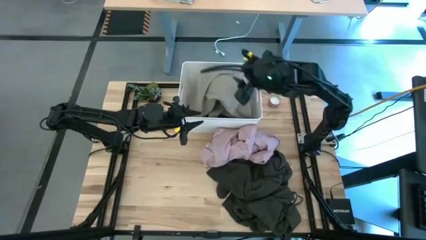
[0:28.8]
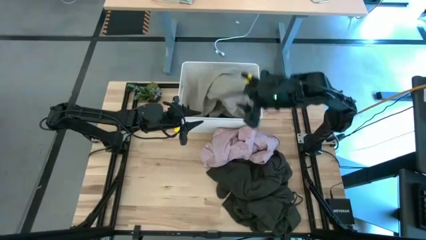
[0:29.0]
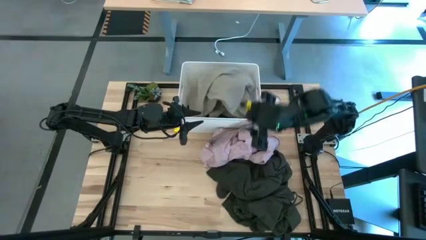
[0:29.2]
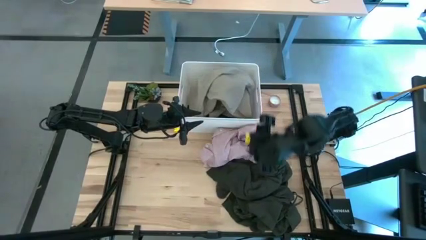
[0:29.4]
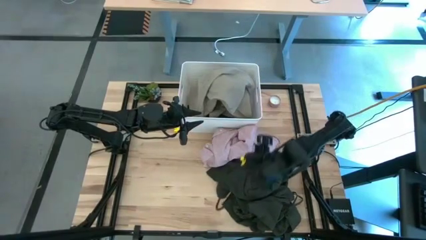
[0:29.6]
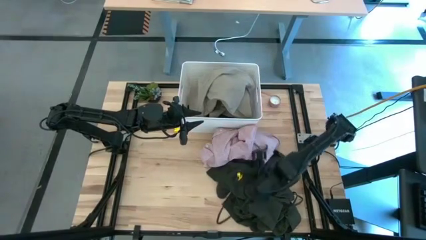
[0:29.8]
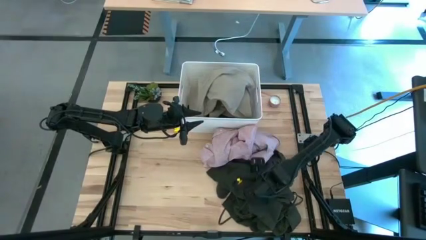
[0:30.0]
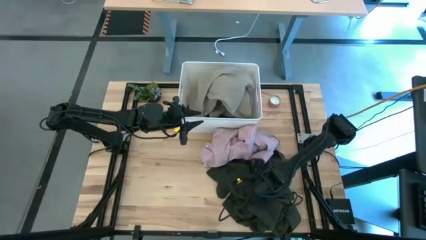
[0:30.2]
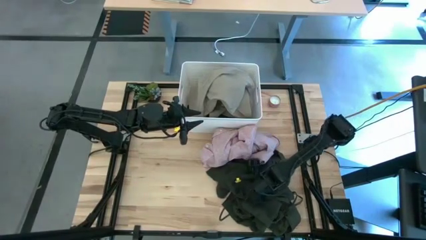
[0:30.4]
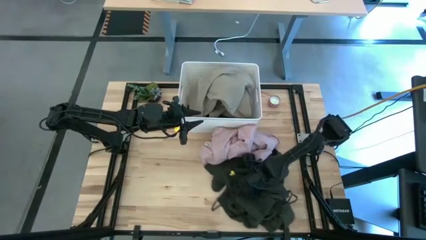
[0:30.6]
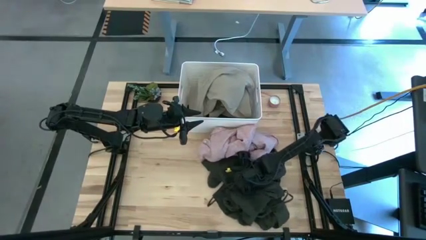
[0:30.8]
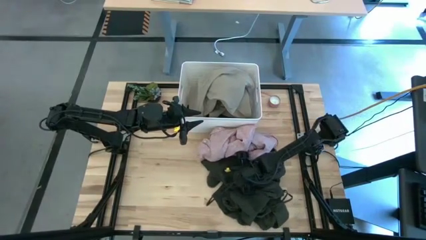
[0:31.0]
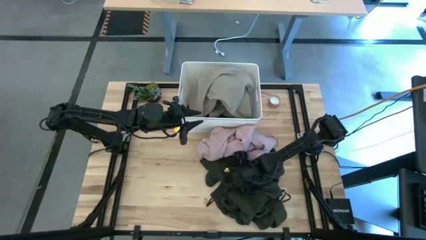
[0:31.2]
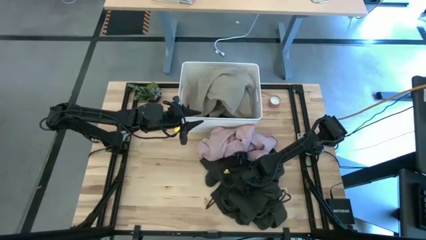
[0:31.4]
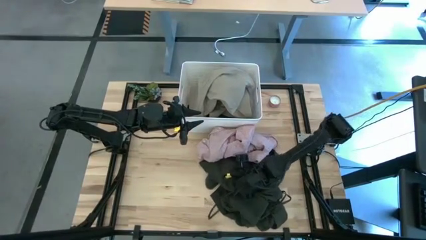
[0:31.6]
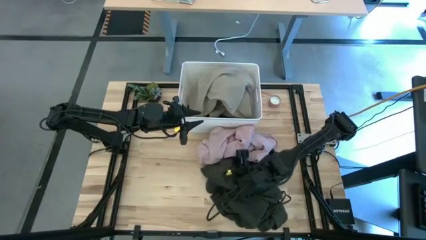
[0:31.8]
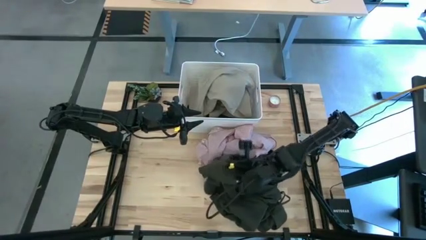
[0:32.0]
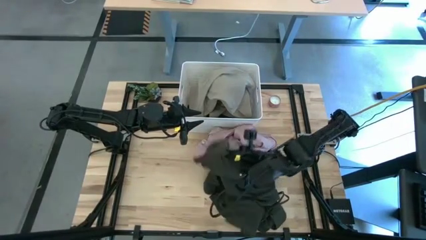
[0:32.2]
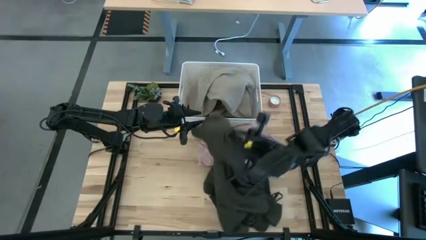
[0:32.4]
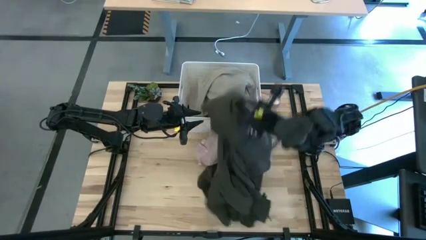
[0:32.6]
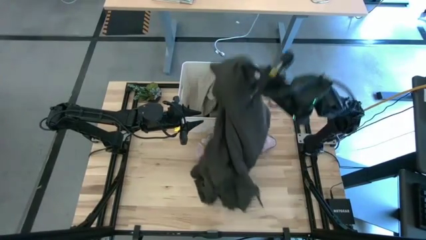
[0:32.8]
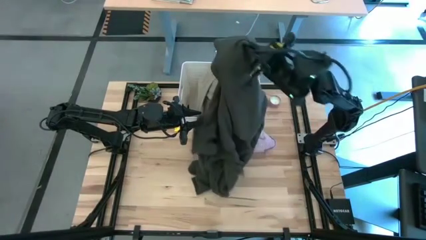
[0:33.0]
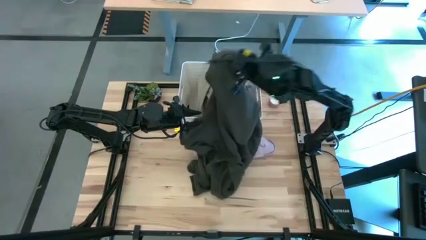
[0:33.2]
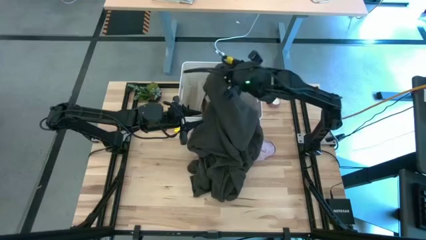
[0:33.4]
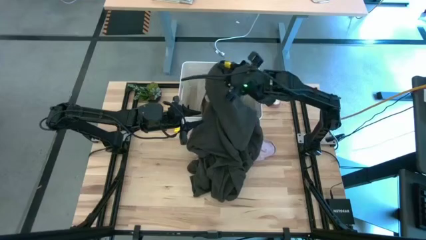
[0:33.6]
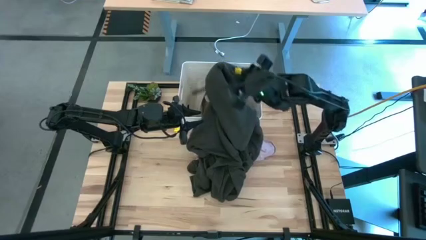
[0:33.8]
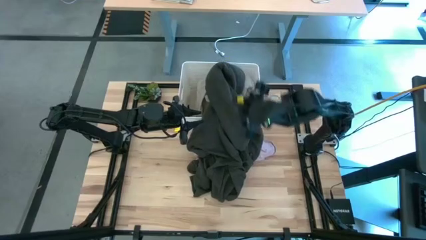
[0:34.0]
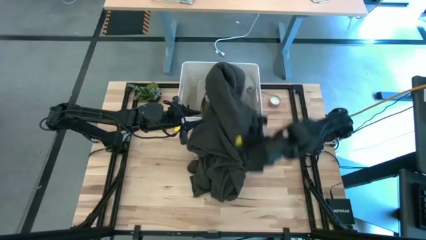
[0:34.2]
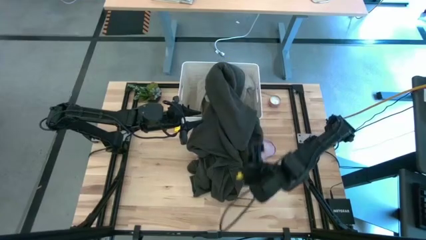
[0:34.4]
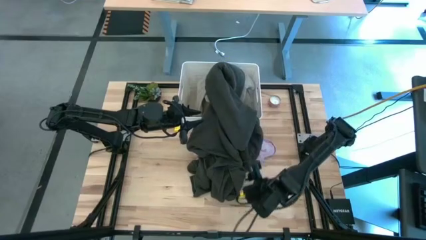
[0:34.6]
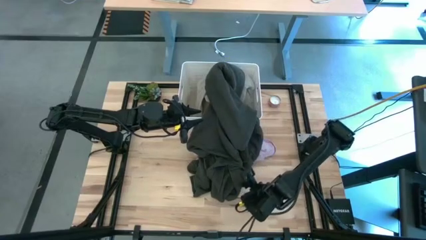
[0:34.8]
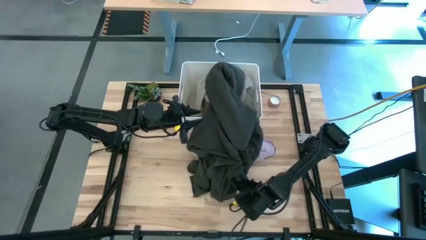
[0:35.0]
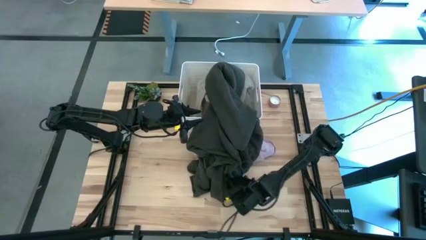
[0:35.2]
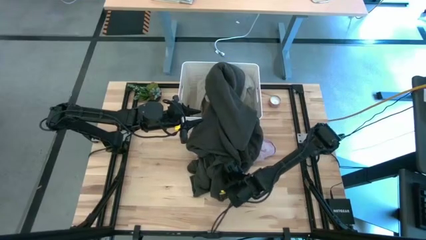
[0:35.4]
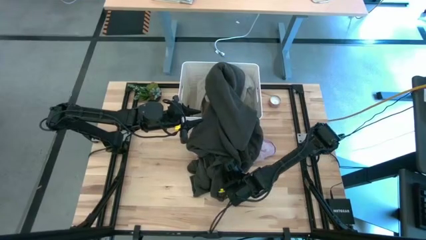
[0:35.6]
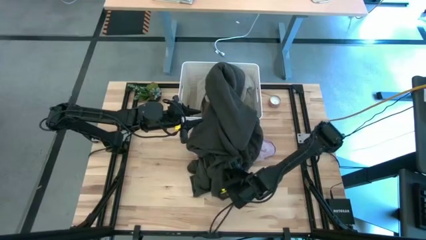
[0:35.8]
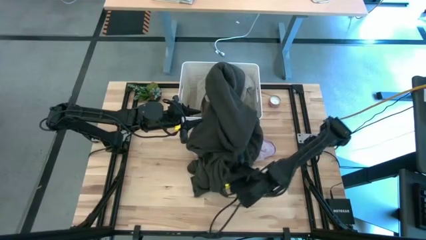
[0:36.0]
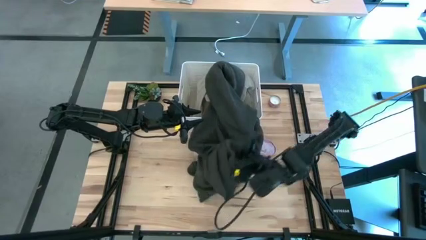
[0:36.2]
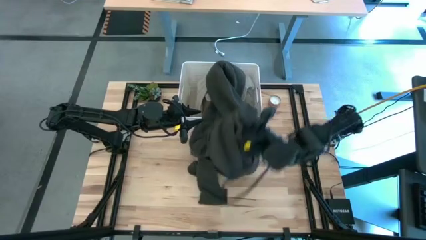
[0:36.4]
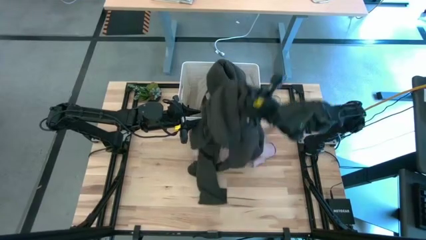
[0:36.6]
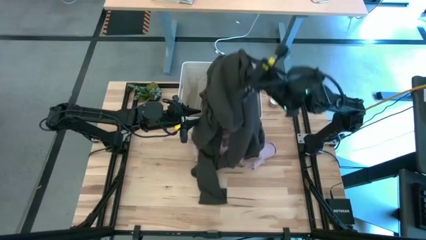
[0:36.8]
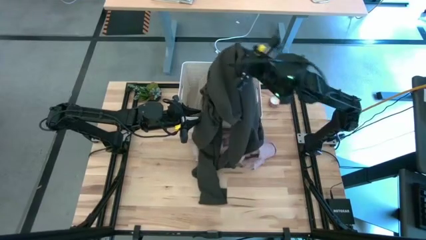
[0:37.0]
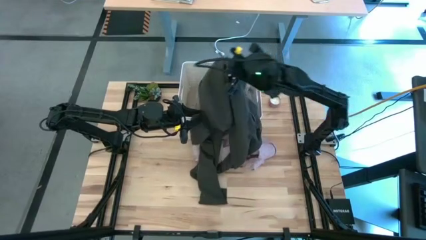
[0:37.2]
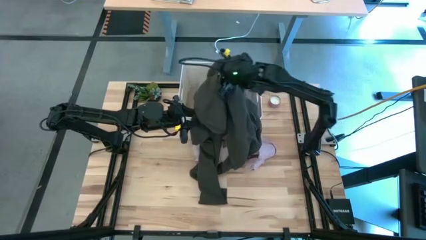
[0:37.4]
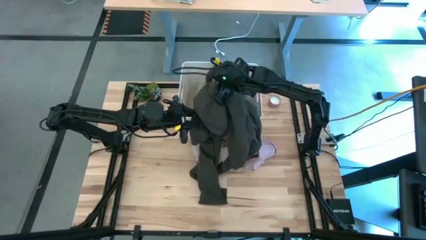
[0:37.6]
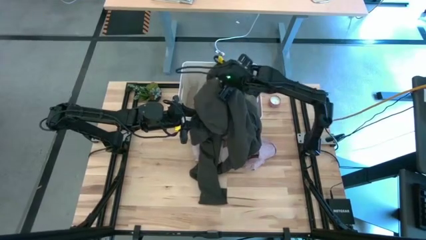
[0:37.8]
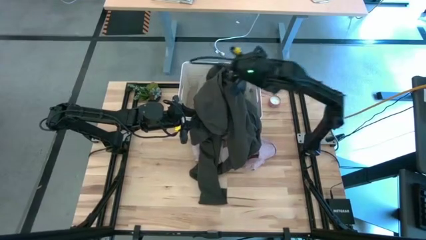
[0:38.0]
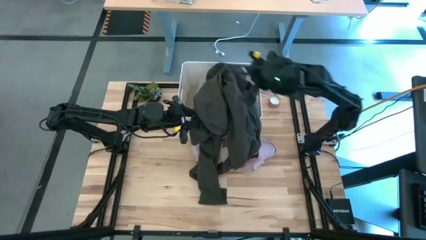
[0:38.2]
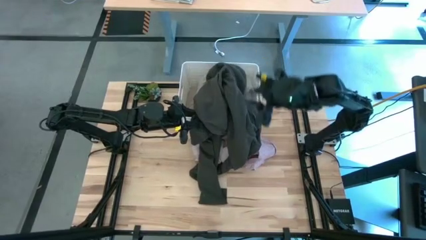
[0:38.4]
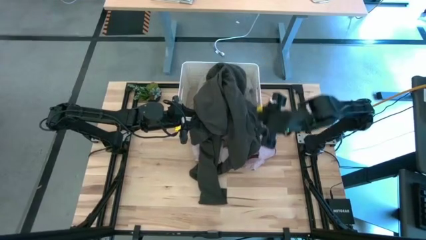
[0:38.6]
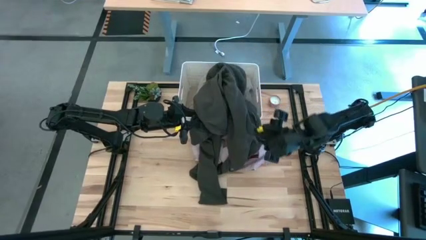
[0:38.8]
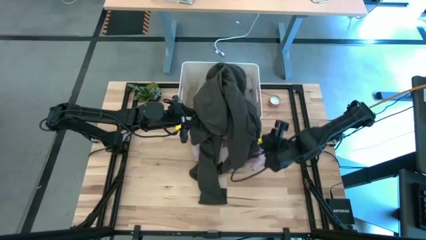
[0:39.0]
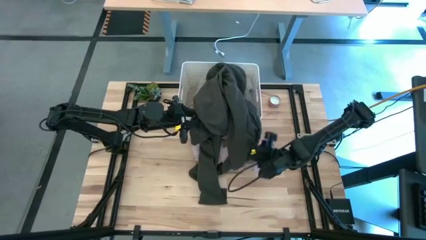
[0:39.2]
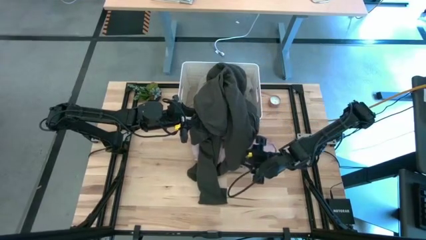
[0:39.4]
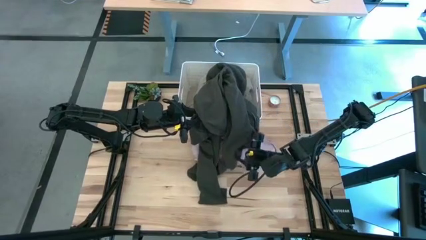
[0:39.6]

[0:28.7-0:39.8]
Task: Sort clothes
Put the gray jacket in the white bin

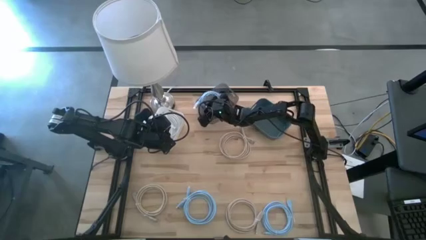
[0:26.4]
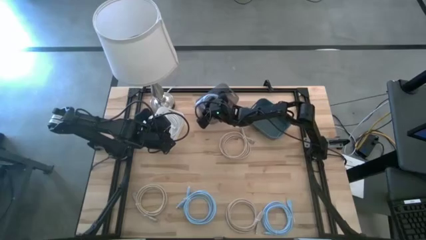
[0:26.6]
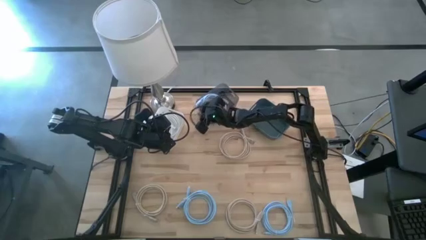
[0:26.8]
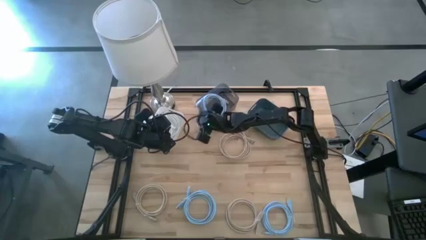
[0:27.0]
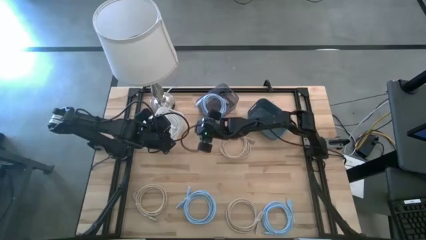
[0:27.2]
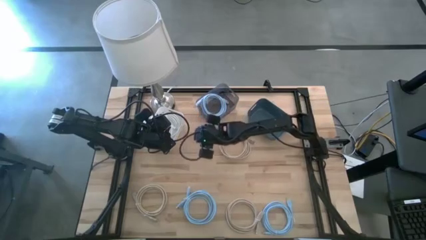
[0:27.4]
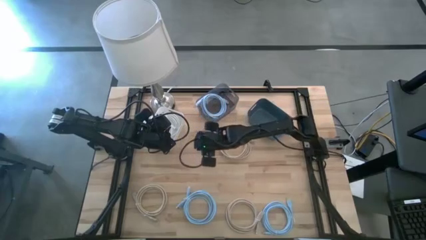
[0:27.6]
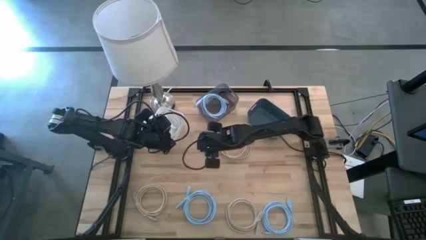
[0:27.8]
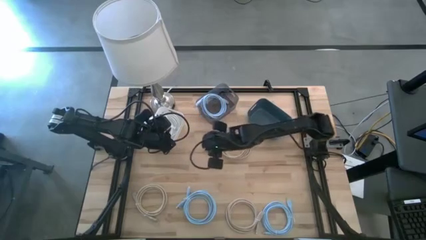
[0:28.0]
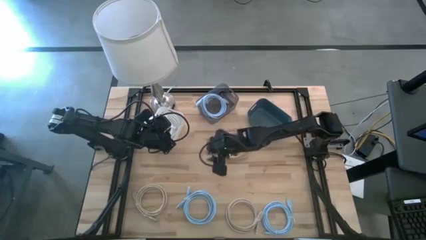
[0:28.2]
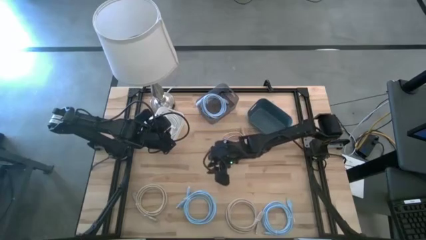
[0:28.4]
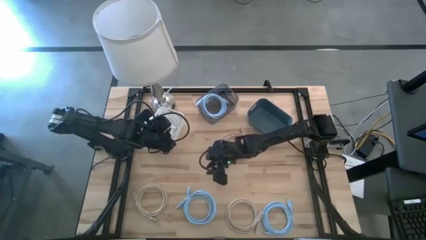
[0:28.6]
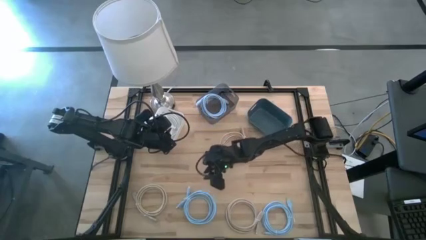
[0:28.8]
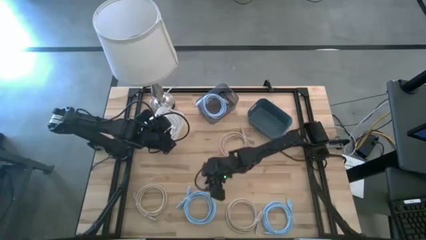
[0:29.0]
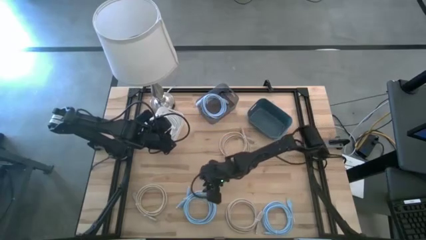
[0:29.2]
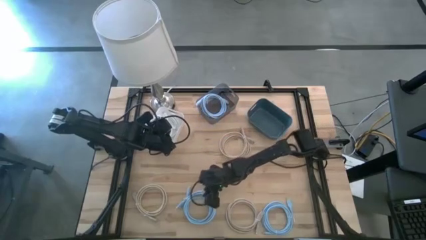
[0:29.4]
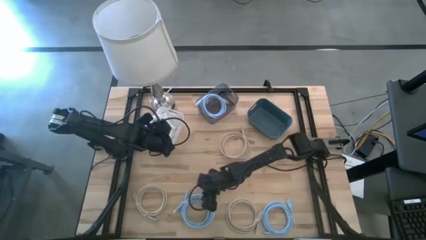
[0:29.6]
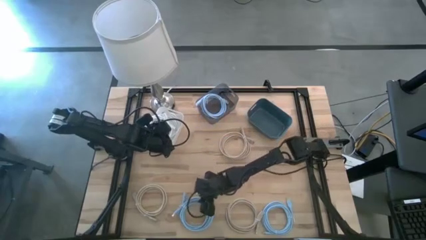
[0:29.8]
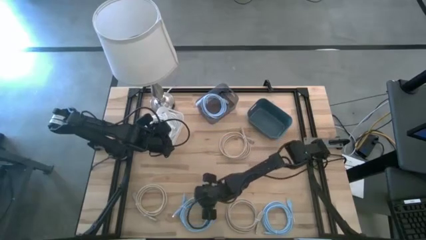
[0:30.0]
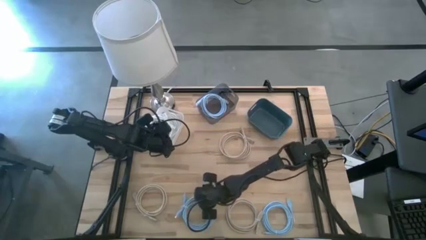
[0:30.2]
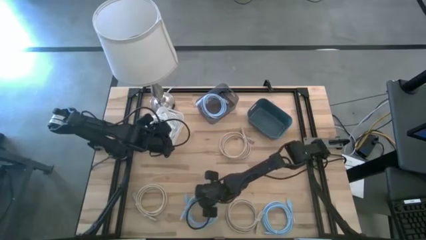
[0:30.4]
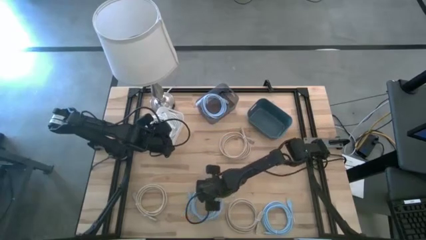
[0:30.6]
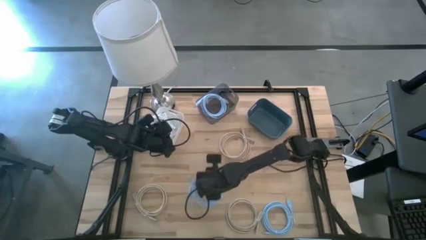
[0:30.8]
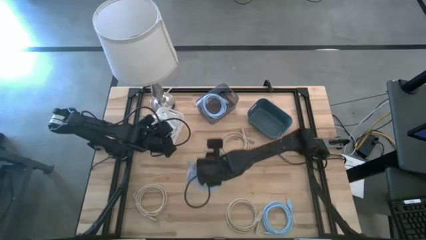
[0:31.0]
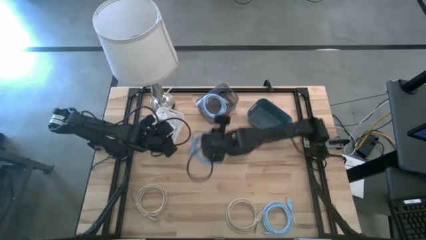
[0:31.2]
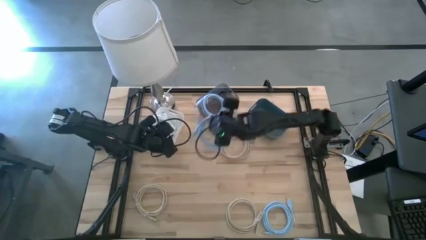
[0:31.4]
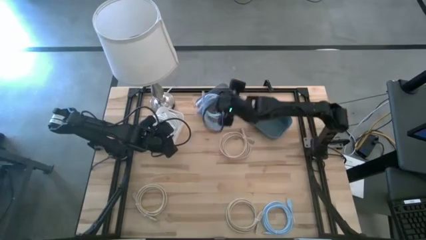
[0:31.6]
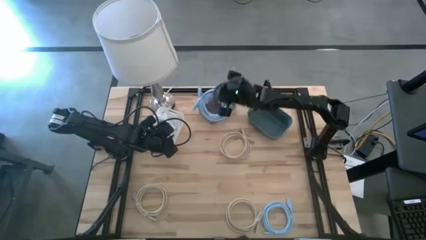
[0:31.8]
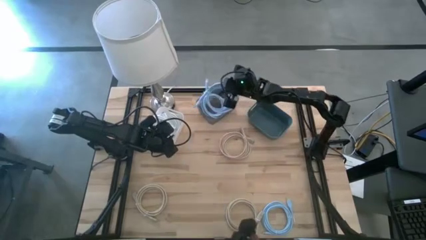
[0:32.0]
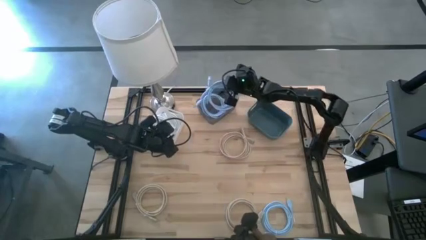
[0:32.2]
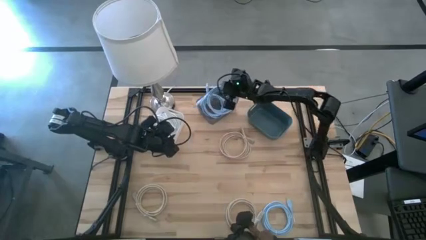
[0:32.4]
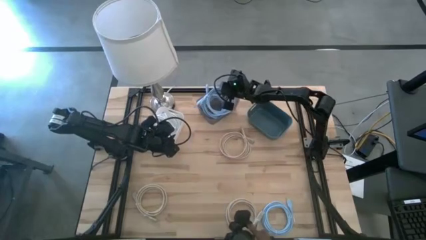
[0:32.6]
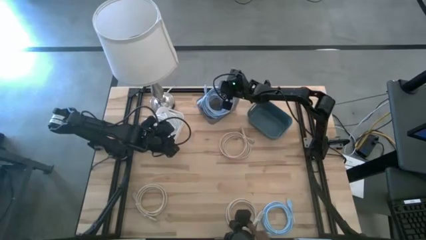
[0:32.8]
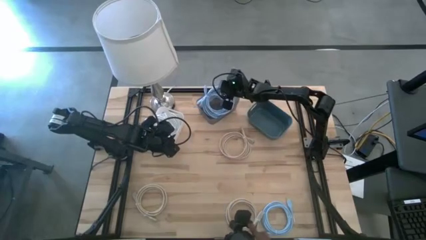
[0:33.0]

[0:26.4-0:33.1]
Task: Sort HDMI cables
Put the left light blue HDMI cable into the black bin
